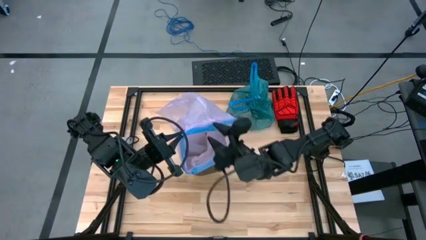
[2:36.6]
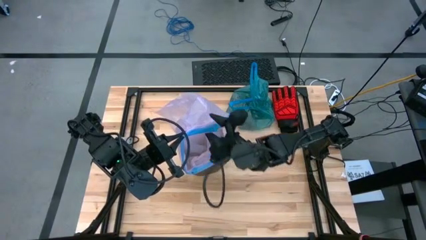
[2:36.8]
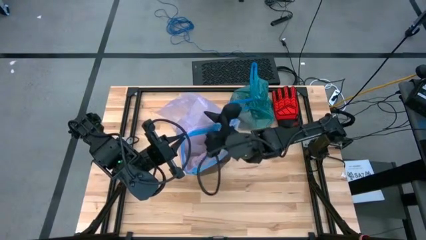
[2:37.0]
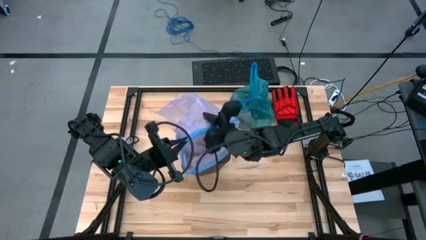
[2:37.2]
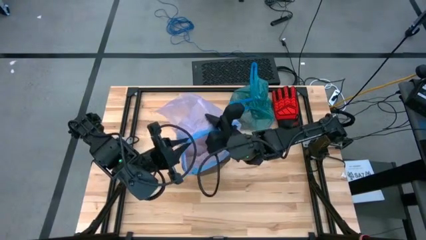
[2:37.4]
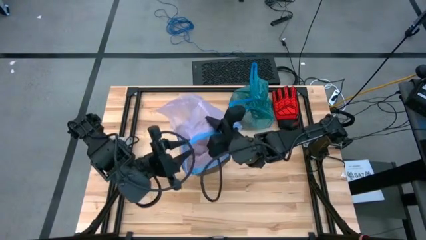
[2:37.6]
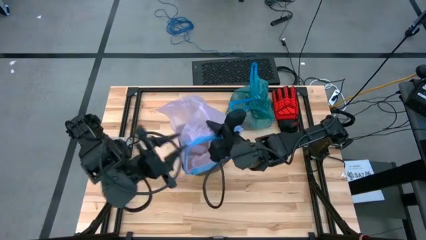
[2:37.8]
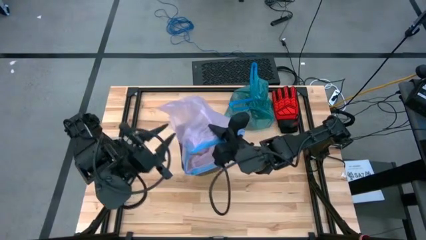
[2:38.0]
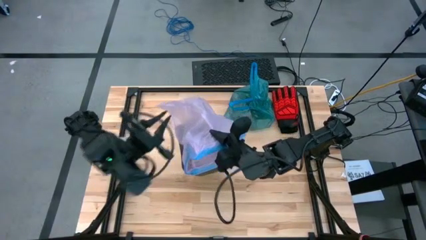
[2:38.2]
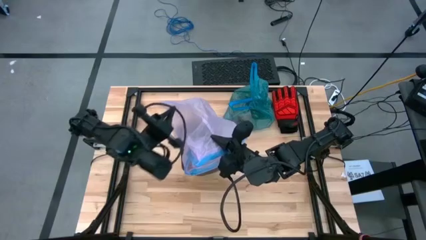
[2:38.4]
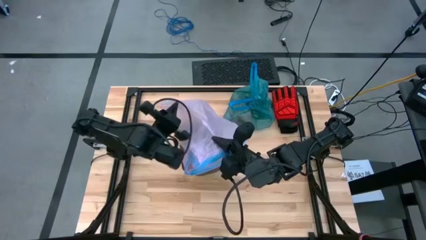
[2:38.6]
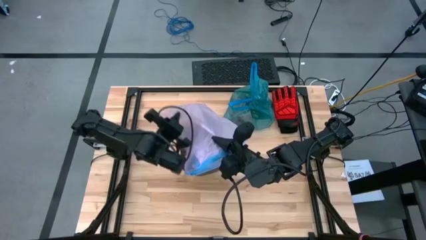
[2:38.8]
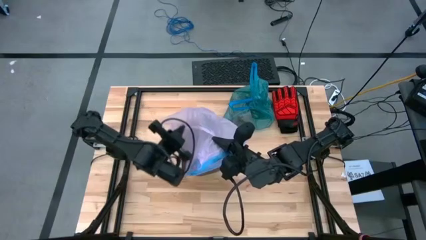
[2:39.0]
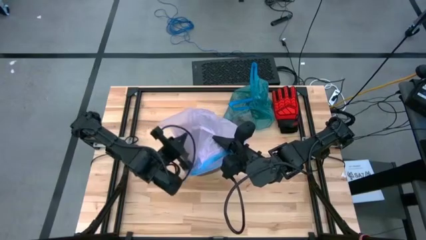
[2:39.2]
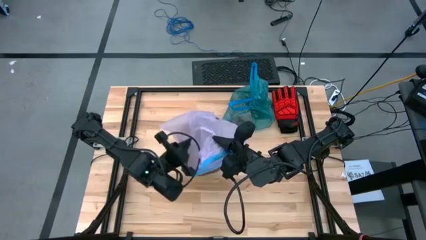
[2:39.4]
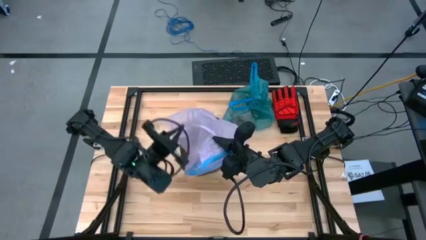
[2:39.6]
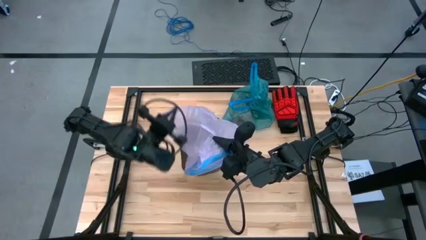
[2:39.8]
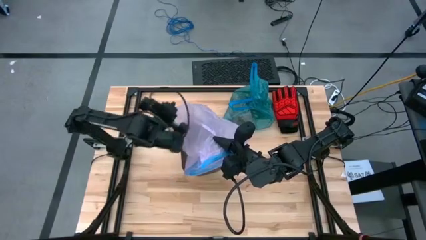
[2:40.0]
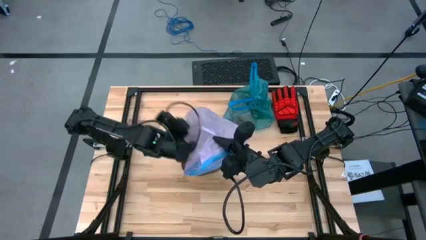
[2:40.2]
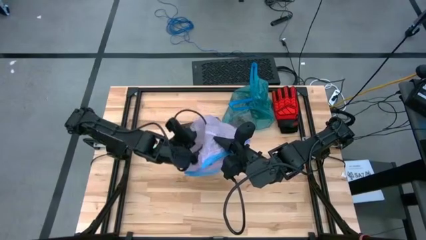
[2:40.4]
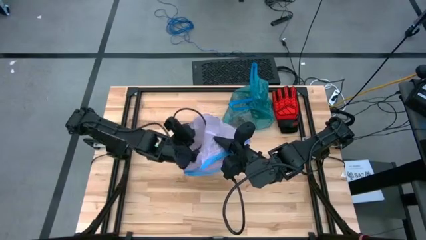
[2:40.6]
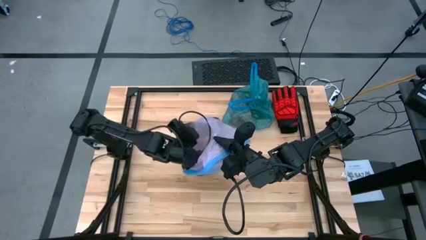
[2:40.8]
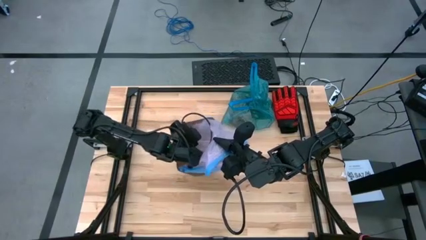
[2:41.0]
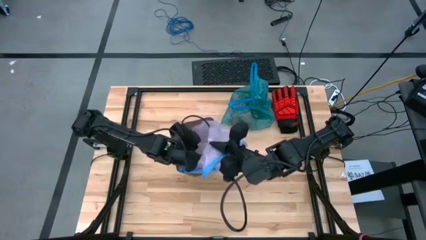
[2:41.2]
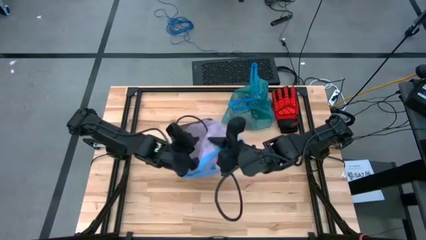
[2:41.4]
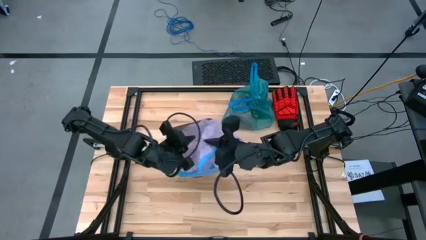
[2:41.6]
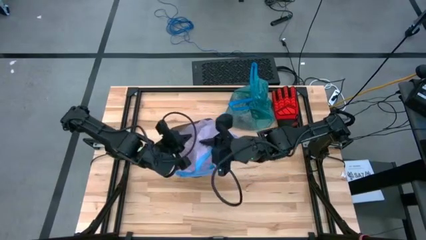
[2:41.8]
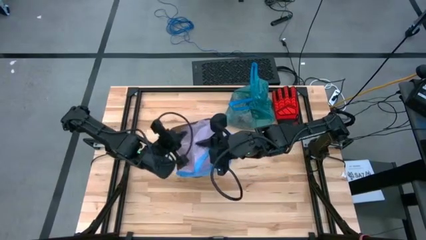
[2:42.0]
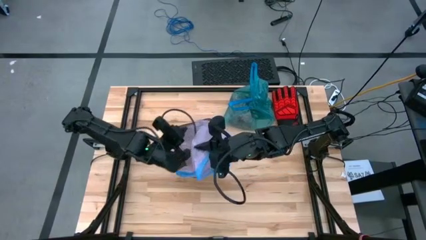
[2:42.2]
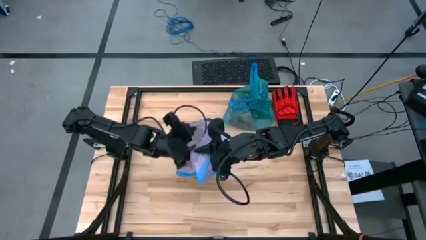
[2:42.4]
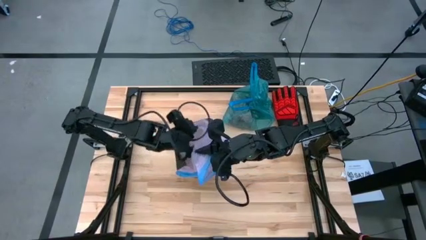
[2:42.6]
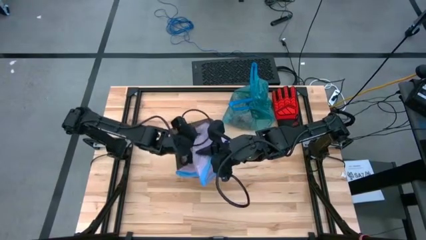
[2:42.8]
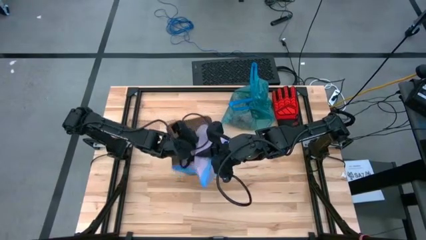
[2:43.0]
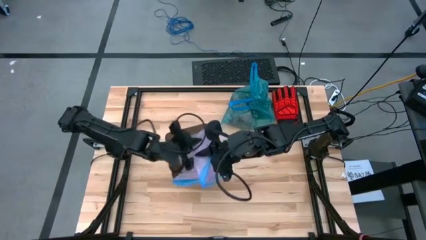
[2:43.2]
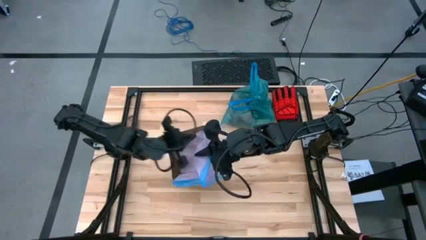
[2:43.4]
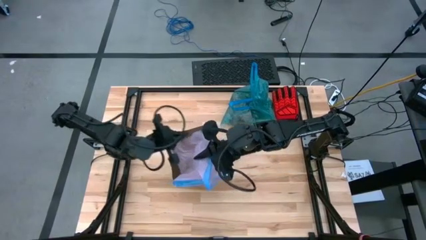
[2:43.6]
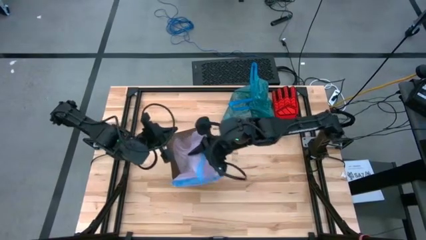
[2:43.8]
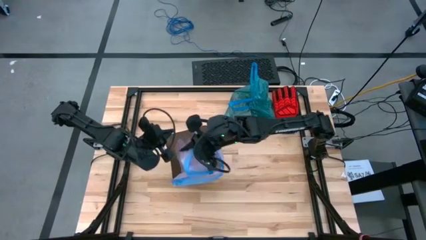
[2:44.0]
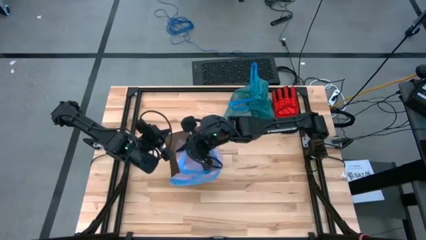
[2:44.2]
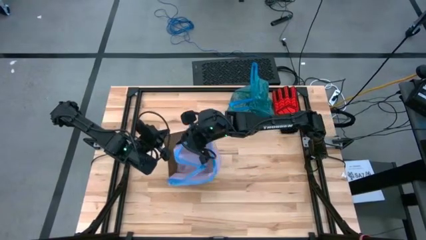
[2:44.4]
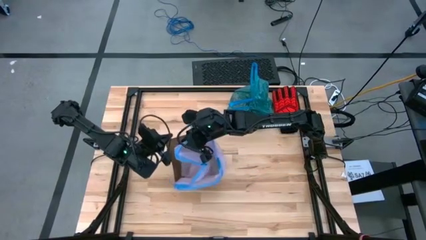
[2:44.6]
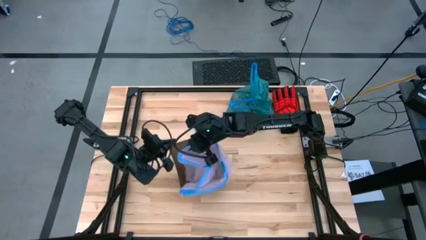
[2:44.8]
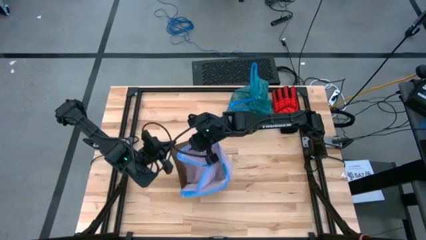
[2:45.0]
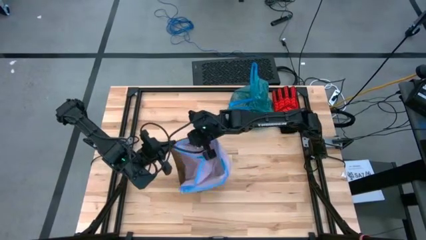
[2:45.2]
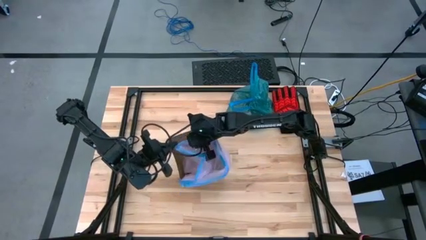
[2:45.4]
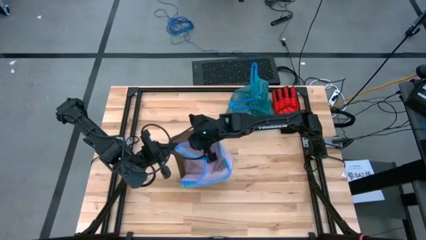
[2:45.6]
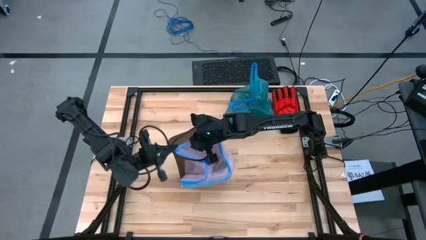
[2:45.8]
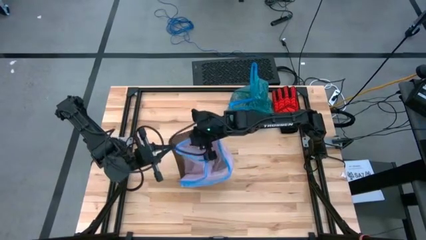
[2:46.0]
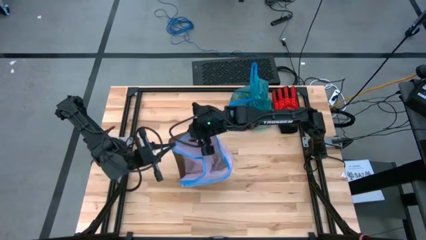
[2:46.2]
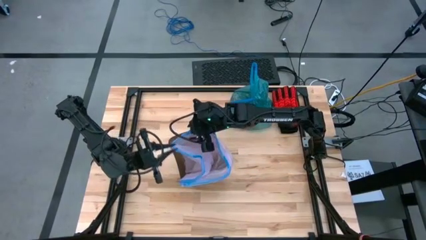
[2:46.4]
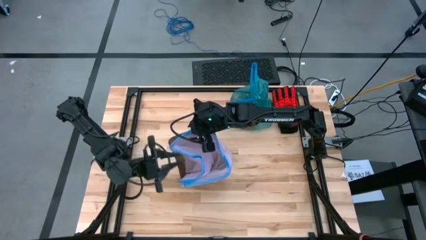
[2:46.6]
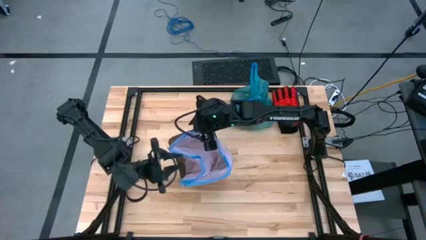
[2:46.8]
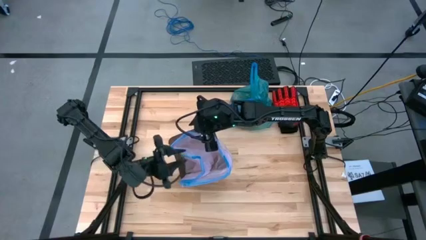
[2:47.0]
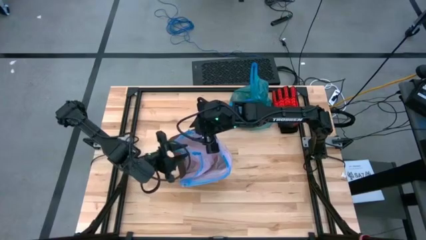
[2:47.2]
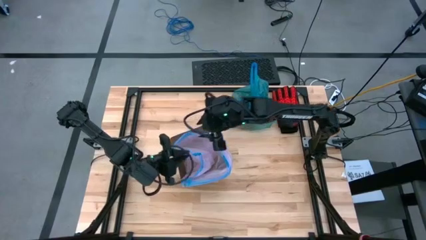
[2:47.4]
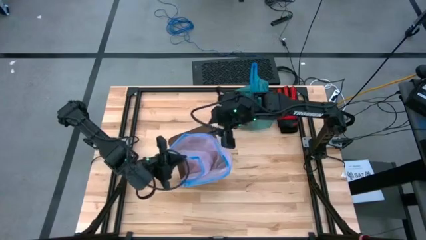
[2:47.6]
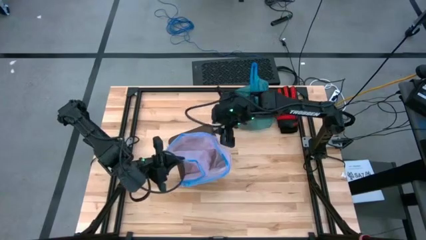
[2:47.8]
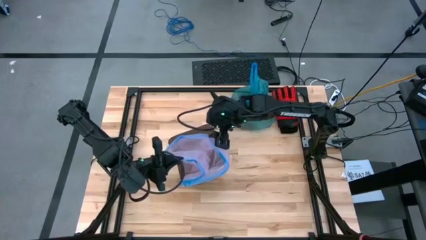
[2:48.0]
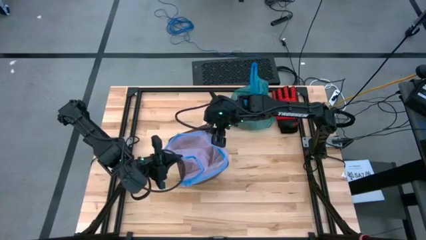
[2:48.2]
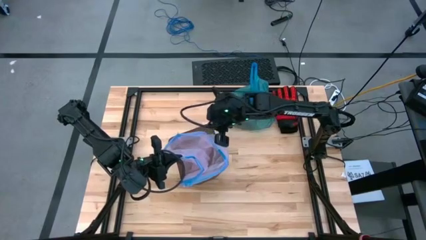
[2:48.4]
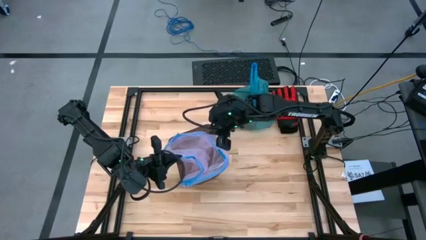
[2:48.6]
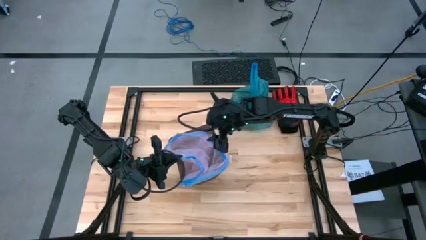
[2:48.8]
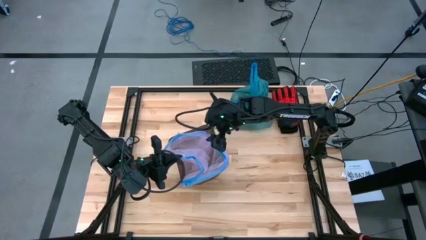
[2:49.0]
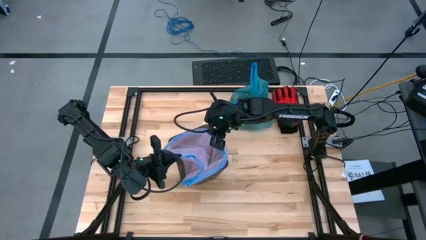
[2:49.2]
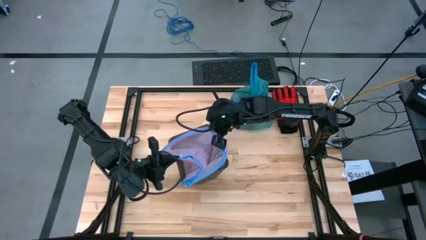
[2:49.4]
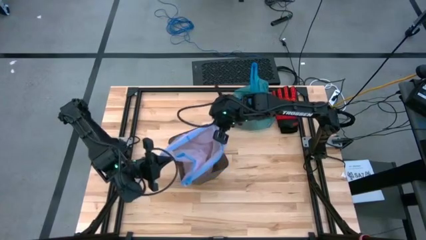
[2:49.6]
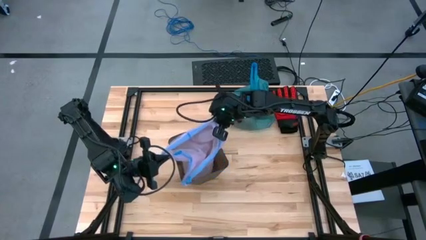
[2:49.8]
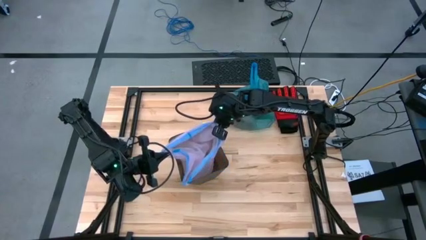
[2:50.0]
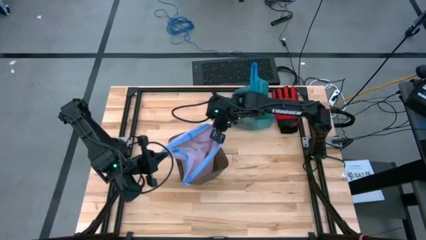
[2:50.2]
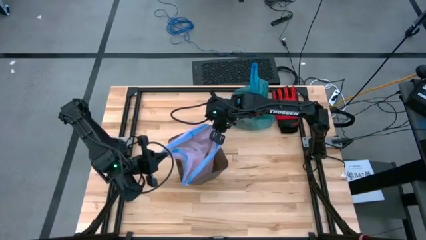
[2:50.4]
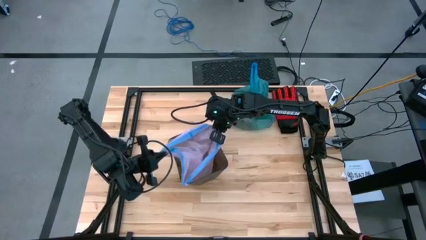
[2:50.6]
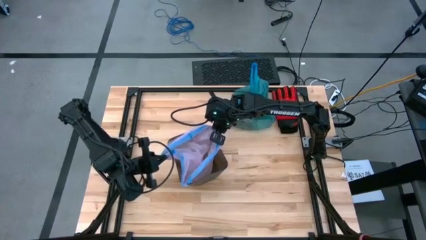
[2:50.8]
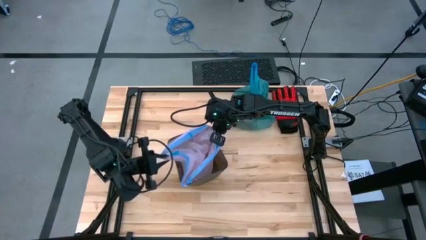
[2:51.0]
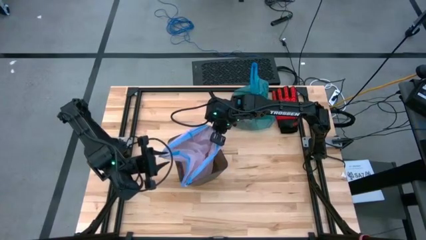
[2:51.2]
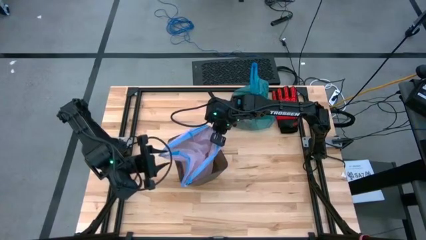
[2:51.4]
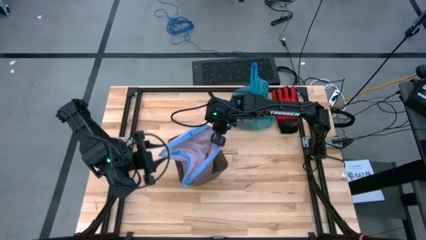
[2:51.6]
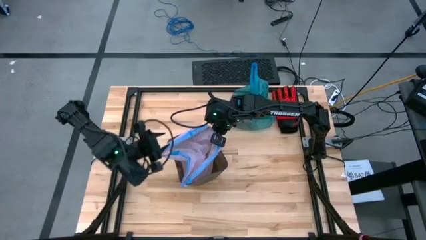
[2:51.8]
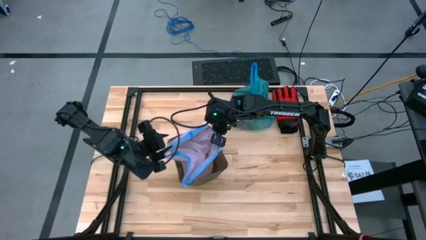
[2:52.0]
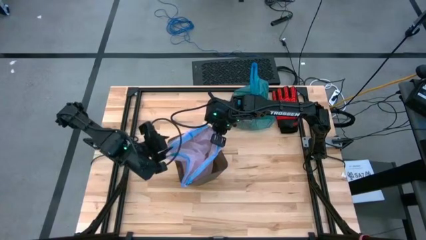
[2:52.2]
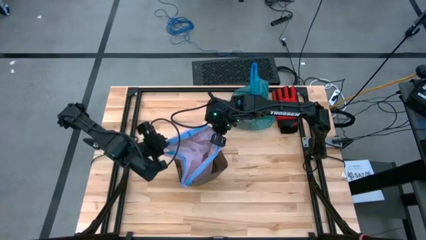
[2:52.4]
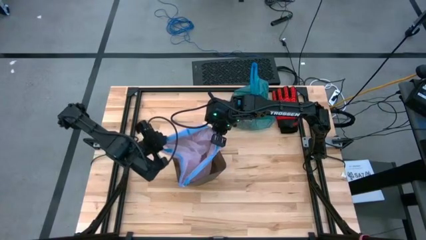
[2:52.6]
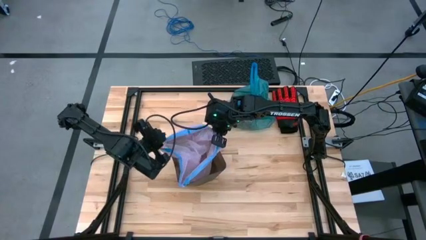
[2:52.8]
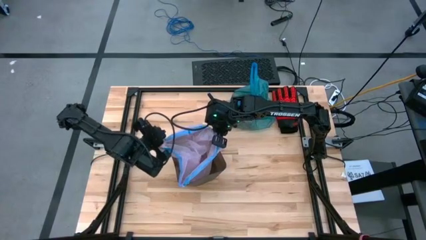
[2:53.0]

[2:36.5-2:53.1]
Task: place trash/remove bag and relplace
Insert the pink trash bag into the black trash bin
